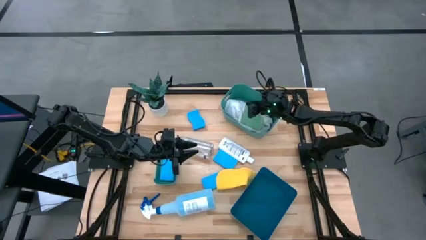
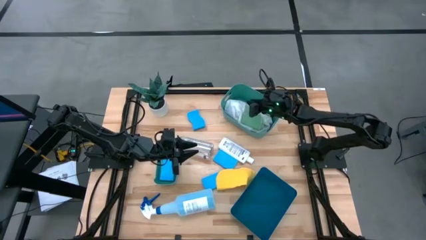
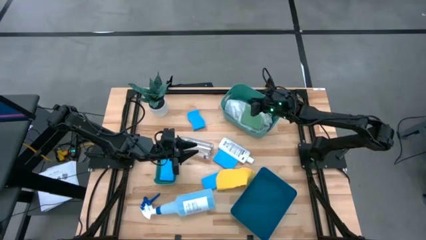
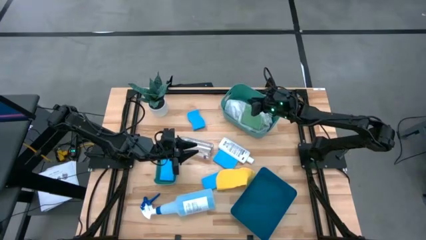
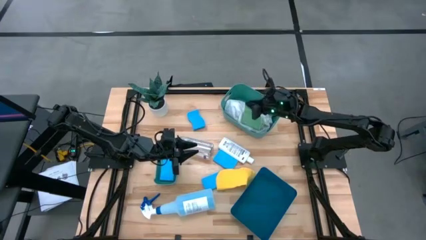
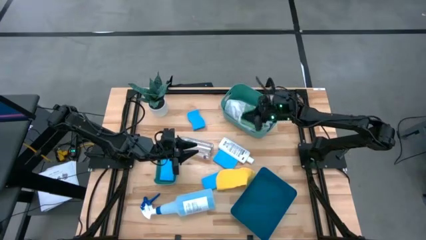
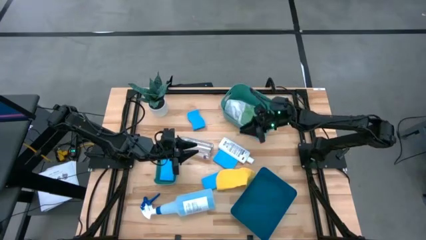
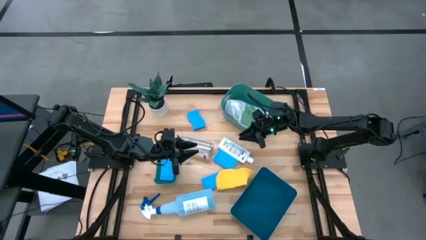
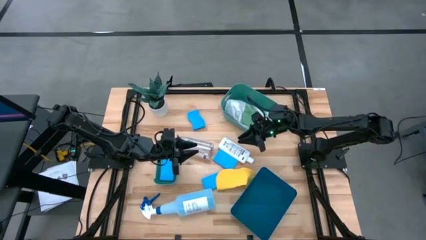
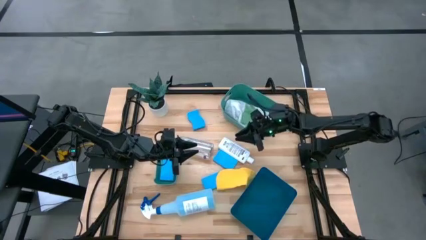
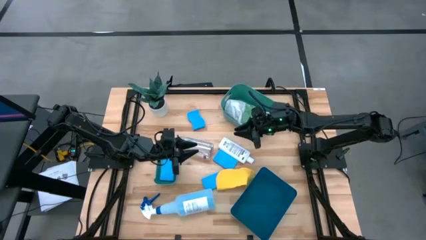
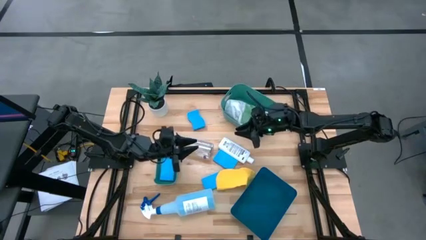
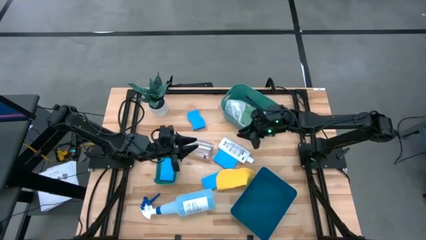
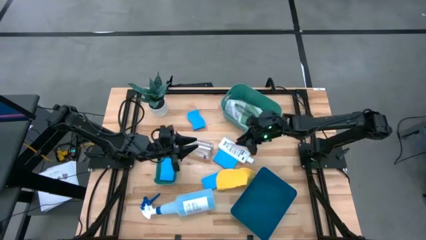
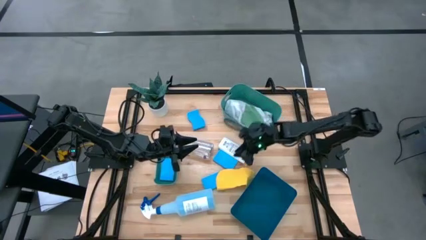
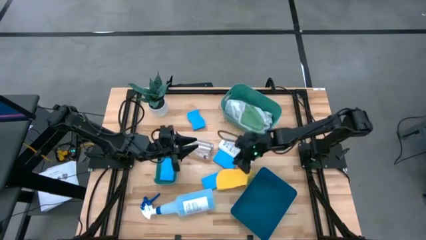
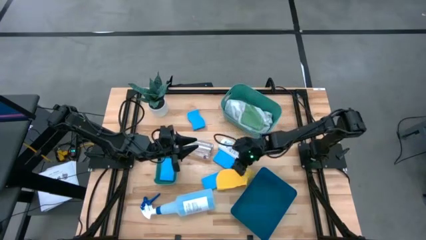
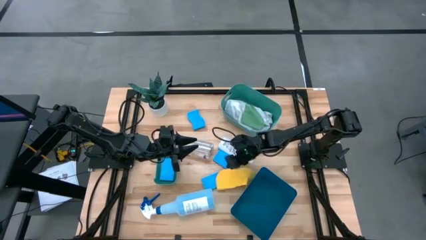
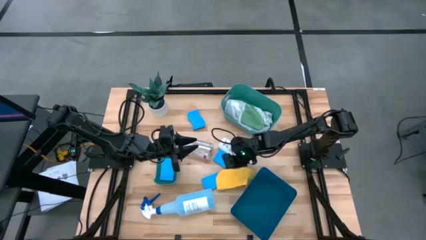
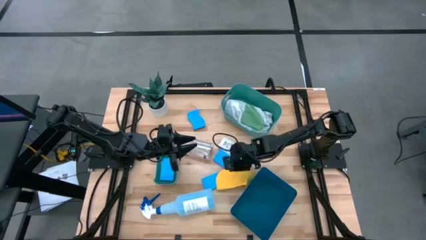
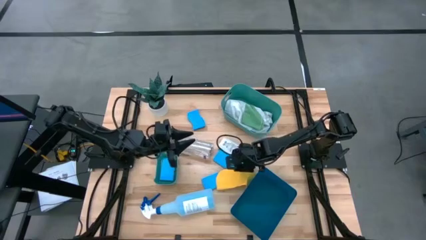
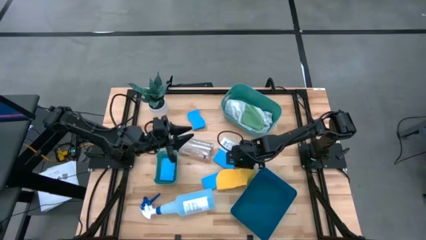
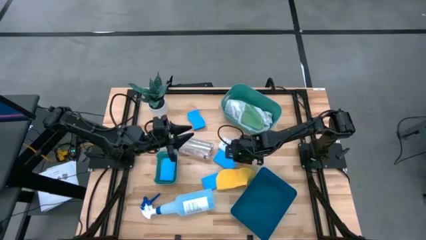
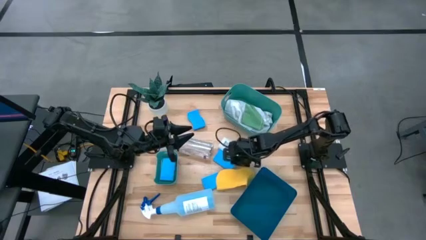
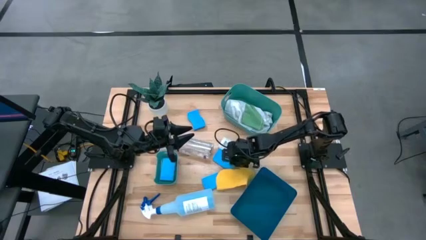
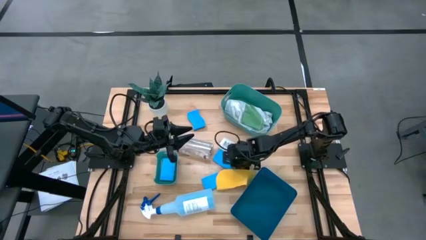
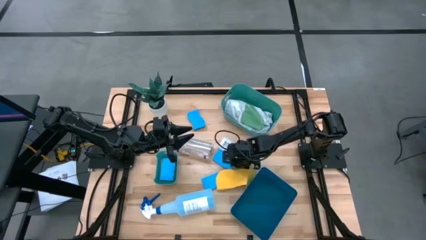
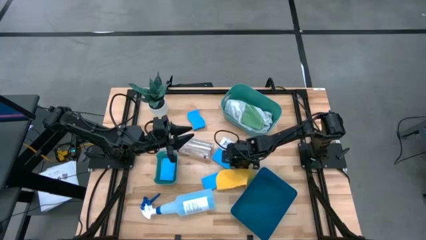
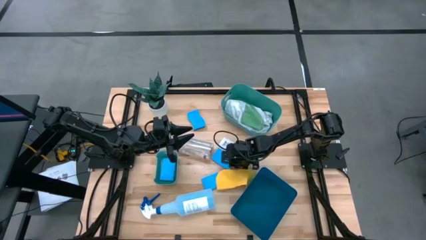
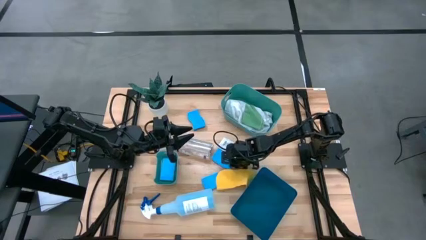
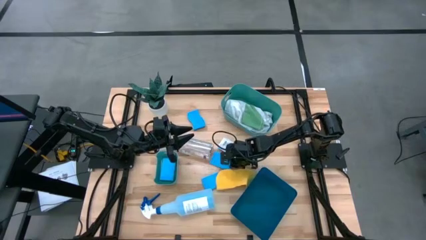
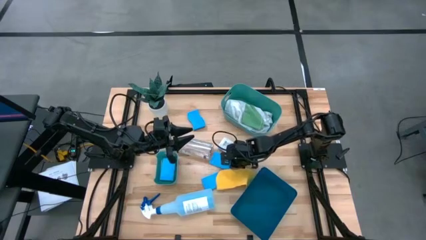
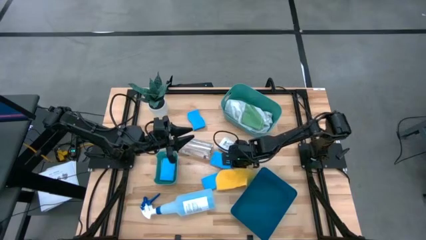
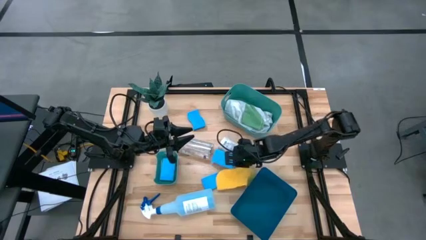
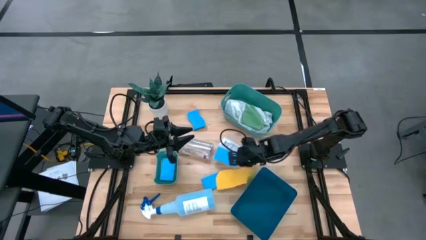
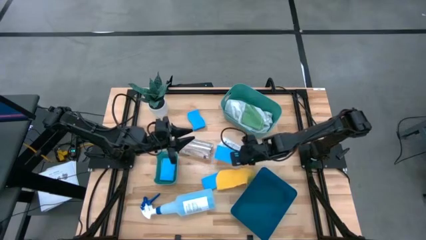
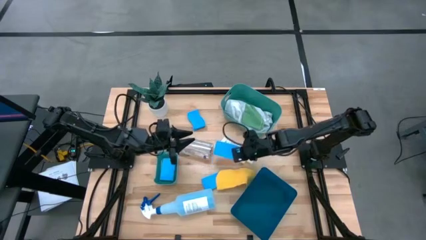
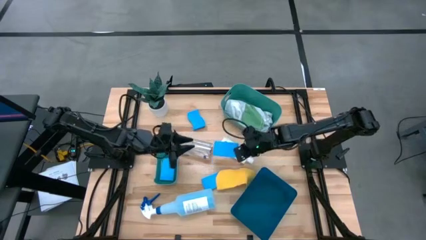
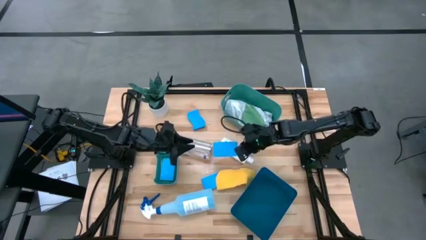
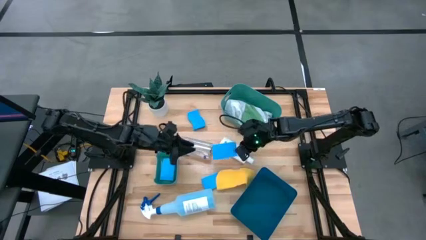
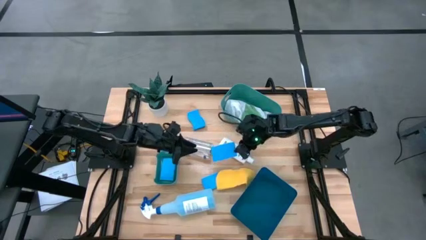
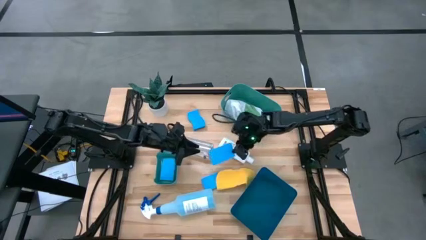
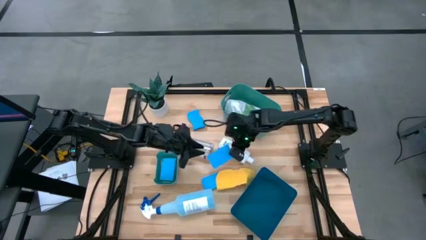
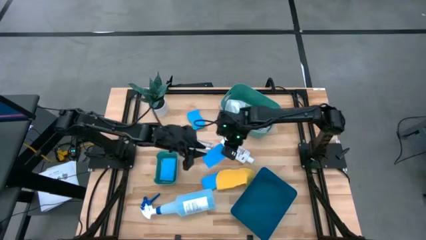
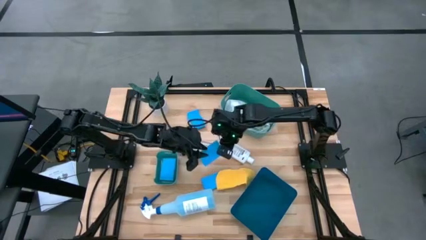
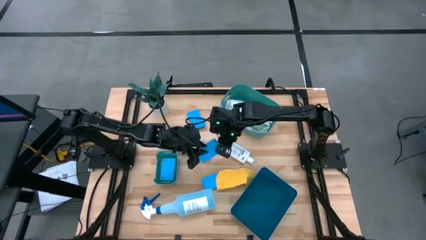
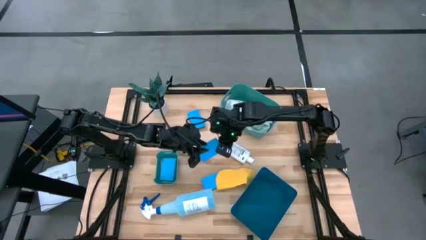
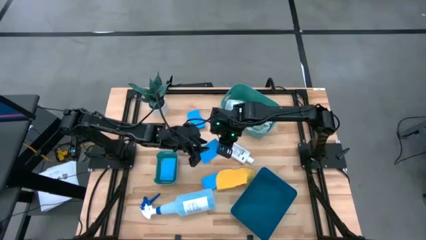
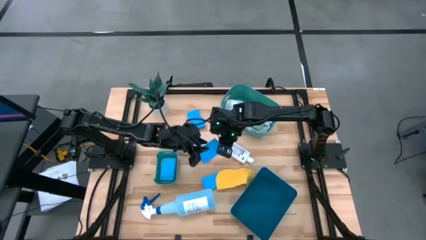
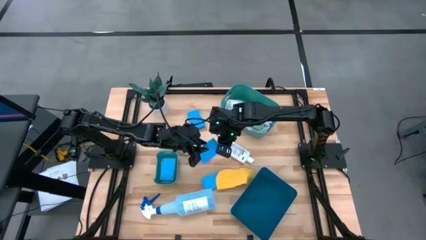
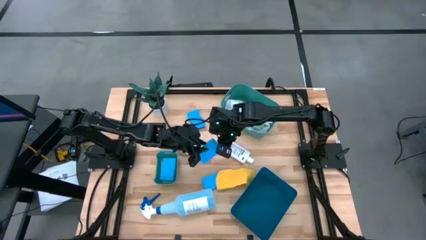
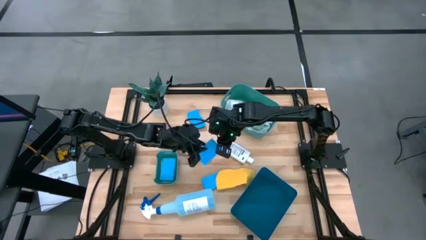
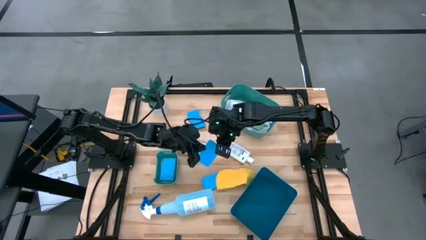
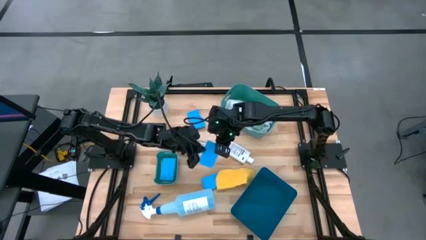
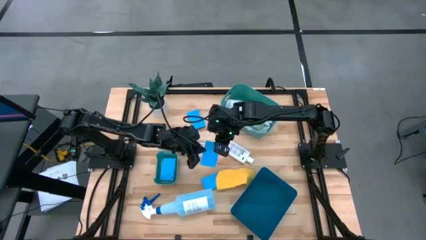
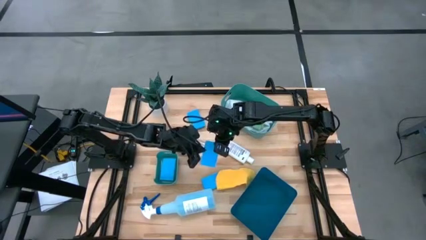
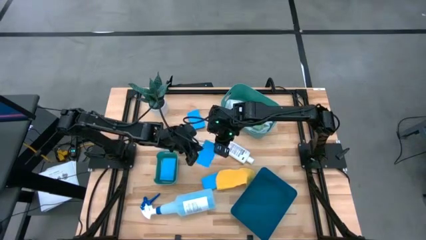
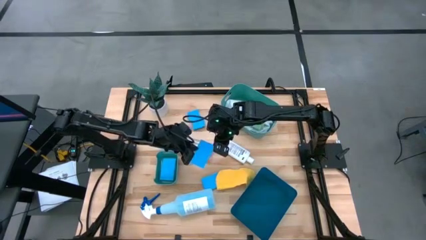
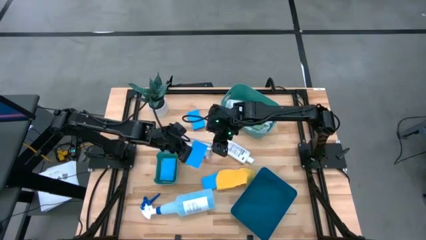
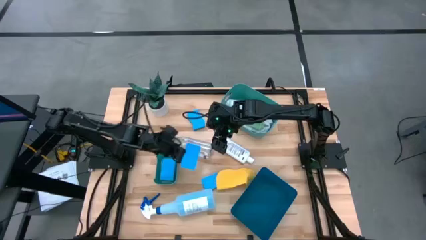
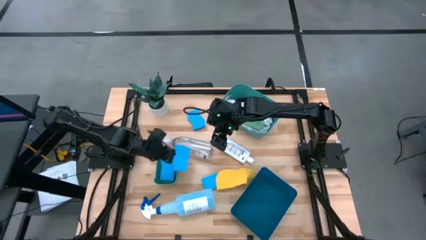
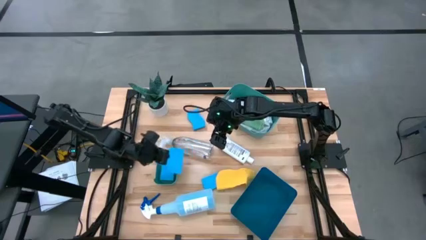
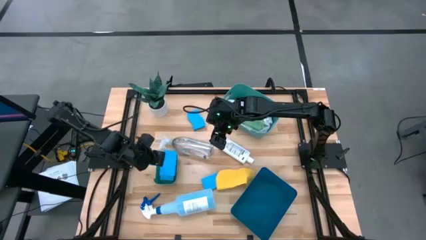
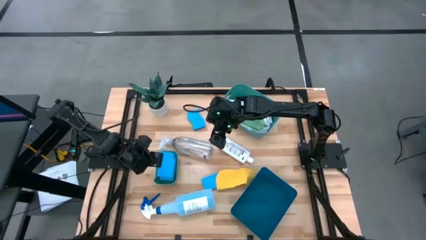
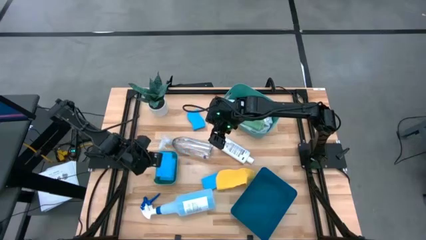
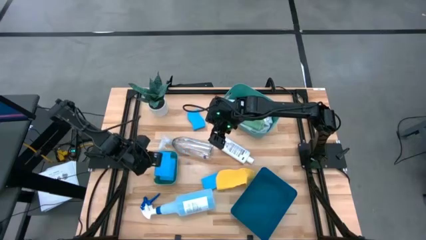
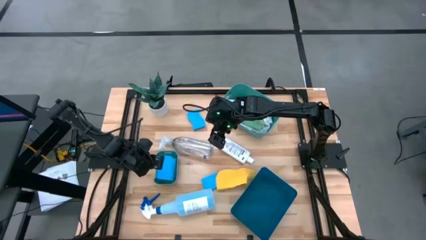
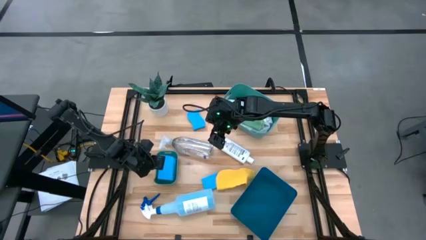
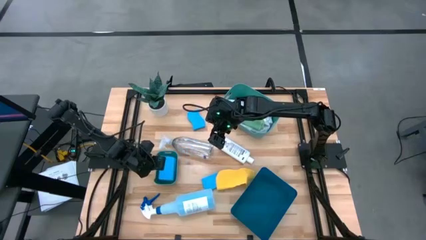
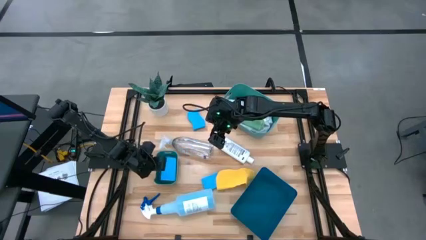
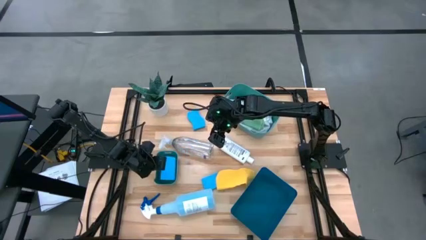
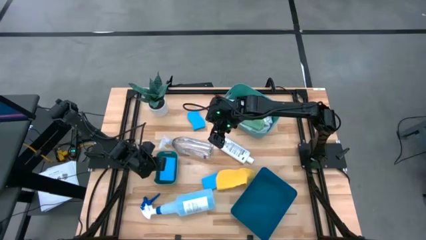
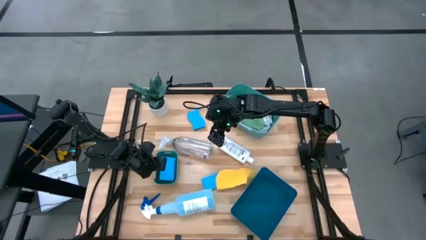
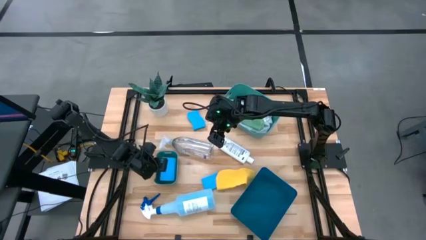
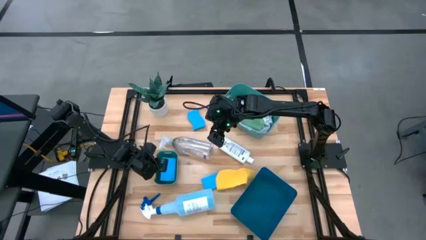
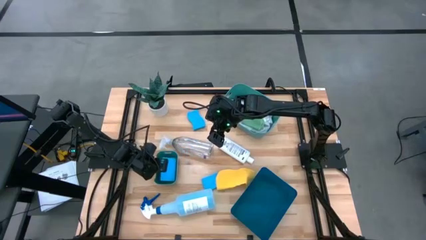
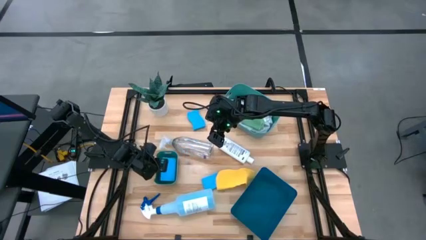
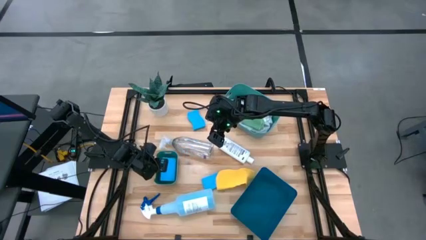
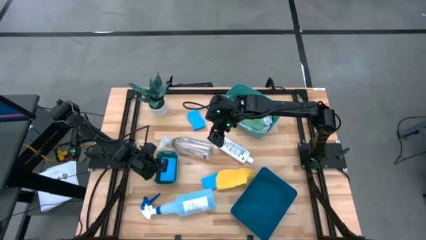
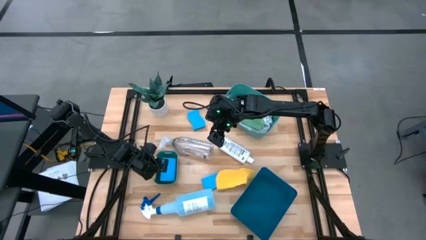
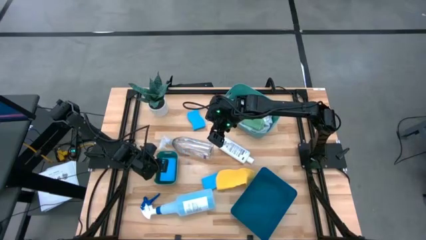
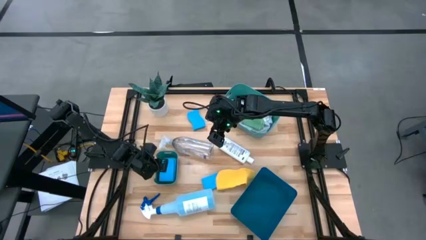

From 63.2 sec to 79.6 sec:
Task: Pick & Place Kitchen Items
Put the middle blue sponge into the small green bin
